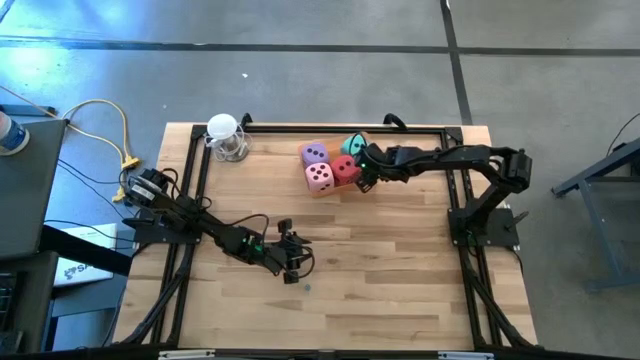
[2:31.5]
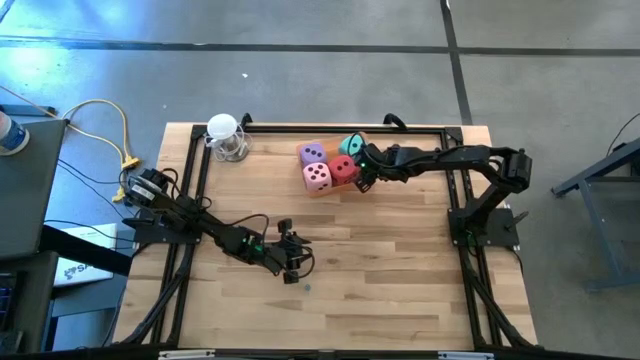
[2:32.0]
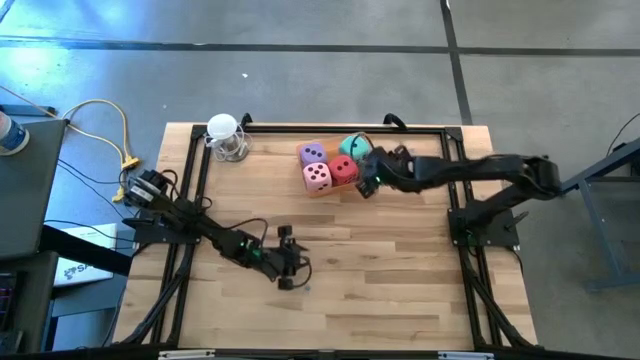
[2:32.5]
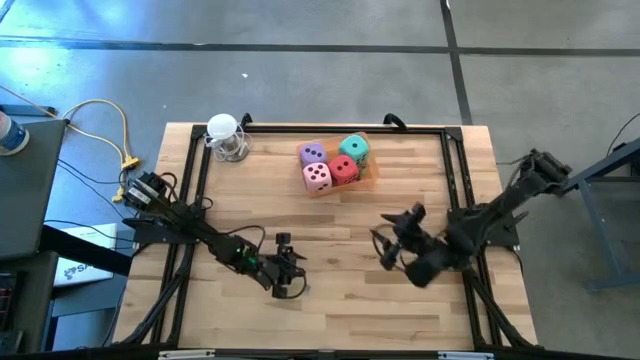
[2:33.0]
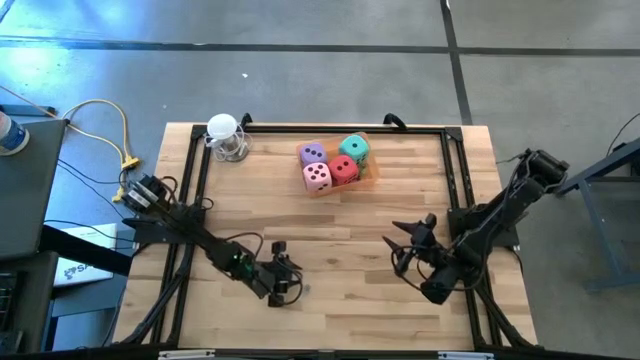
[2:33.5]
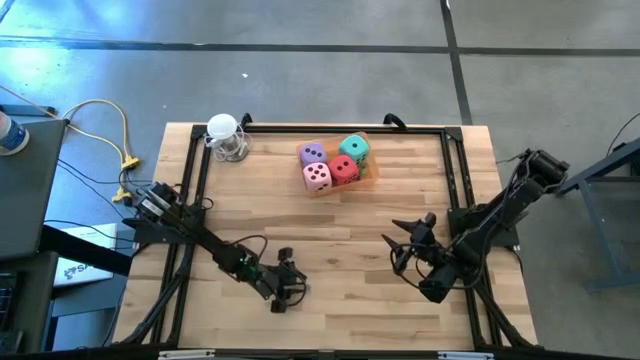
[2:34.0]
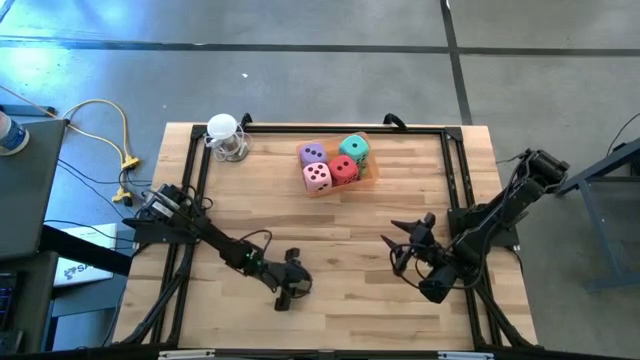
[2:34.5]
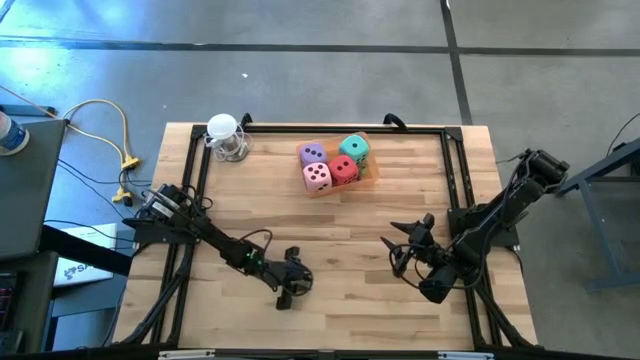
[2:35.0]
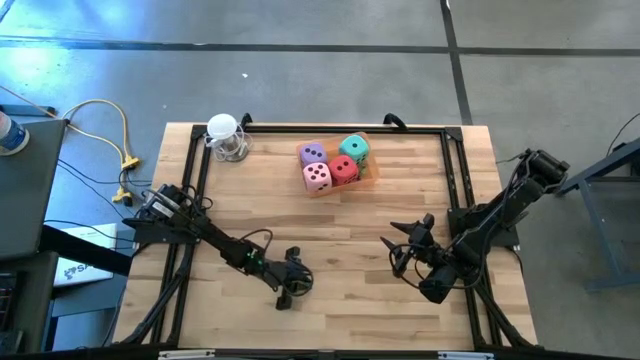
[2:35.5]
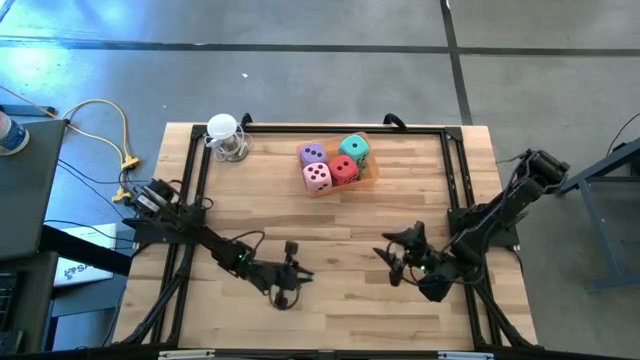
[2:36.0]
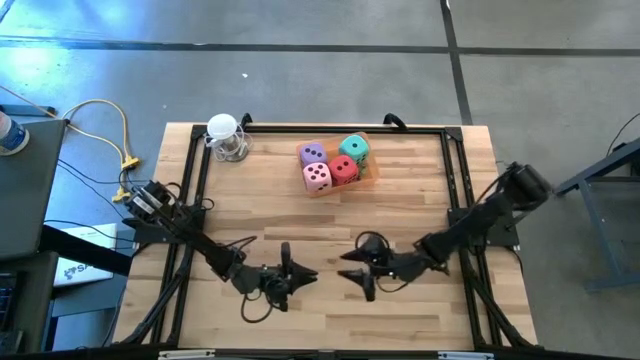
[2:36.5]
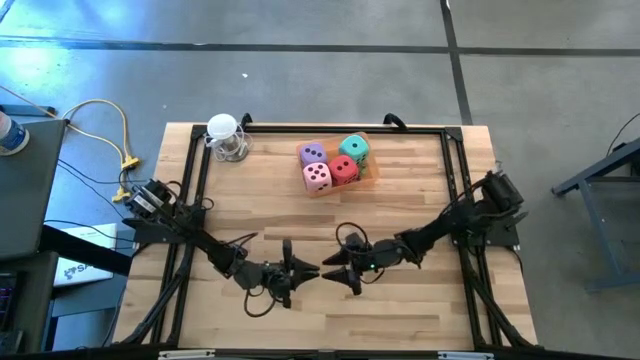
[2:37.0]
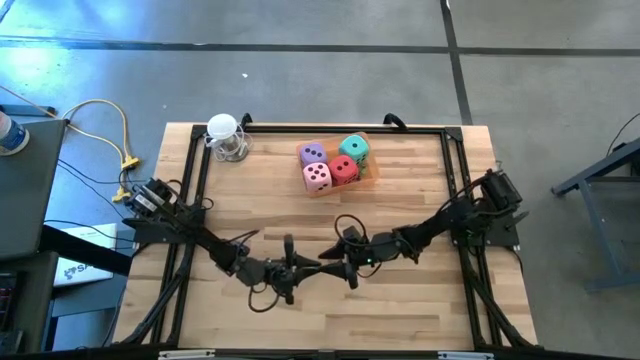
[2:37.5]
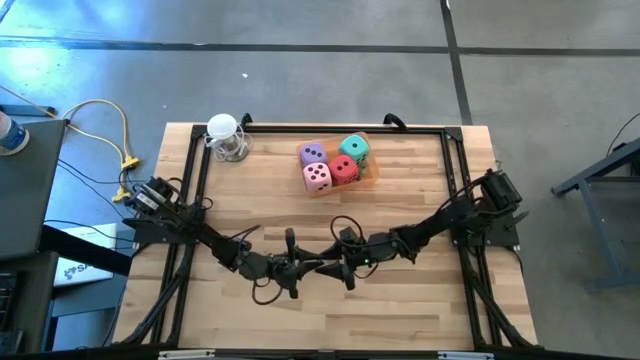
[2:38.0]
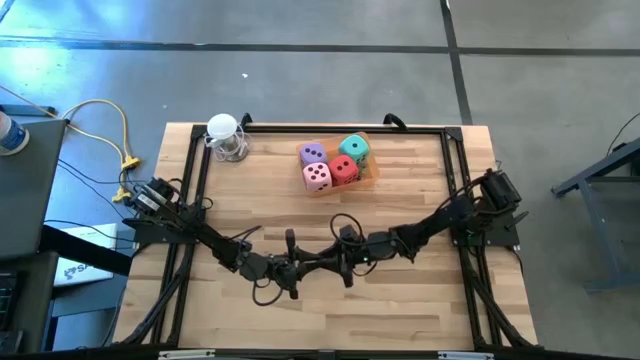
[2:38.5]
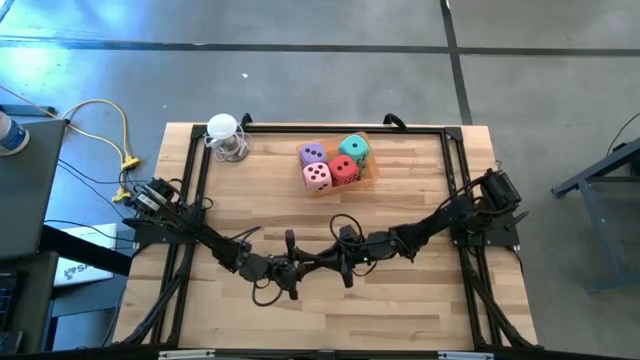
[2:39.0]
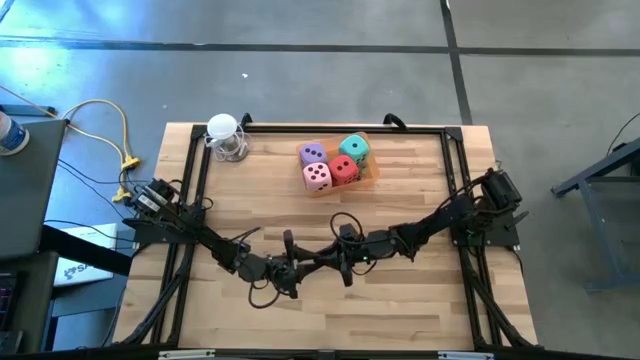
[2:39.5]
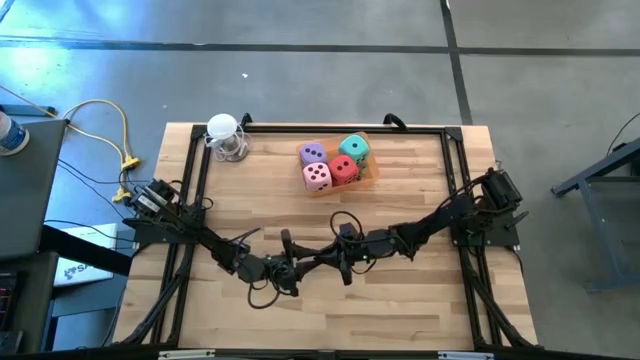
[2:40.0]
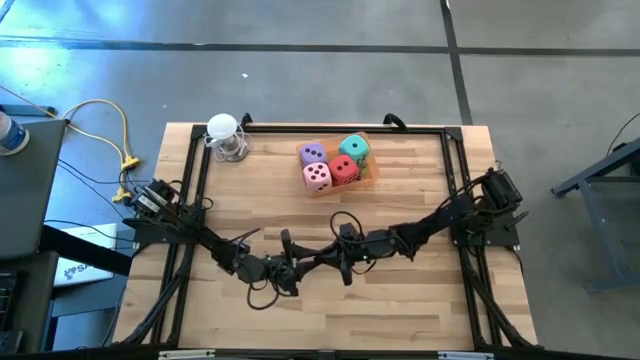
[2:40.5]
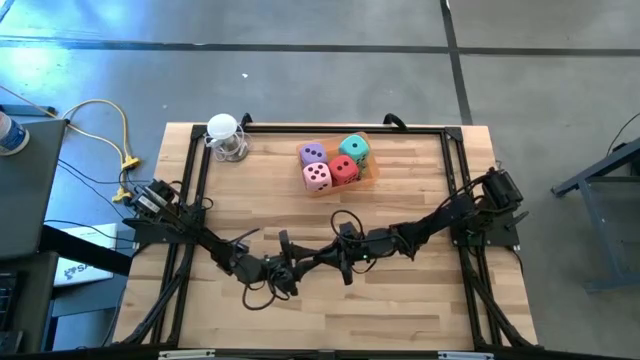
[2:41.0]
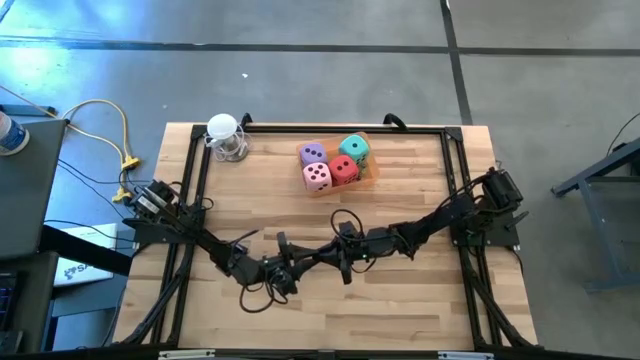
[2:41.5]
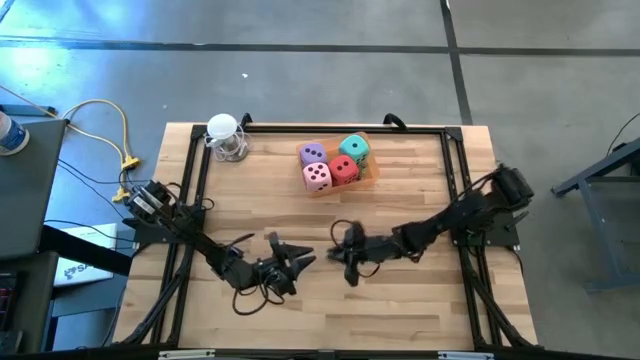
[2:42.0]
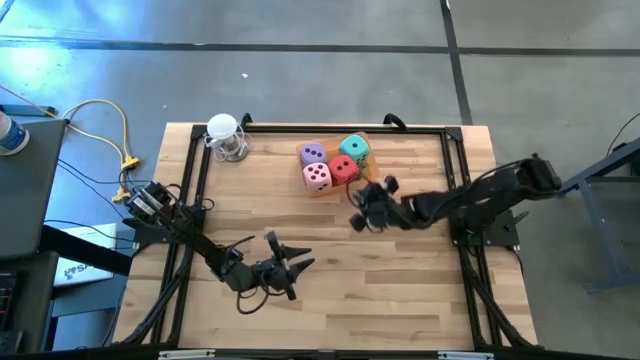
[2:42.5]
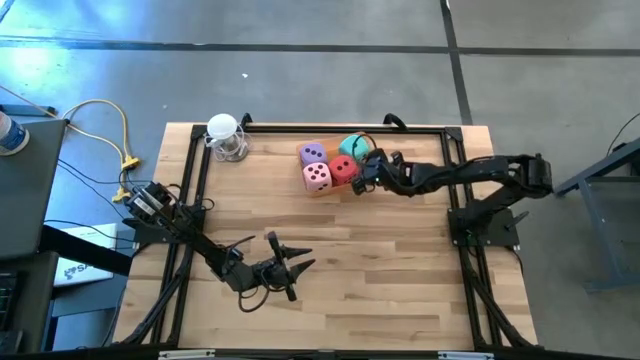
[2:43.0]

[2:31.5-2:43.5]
Task: Pick & Place Dice
Put the small light blue dice into the orange container

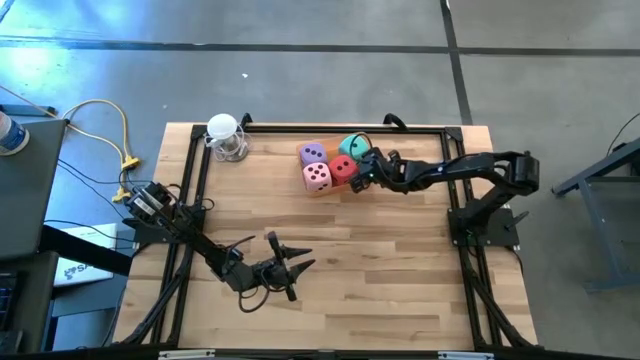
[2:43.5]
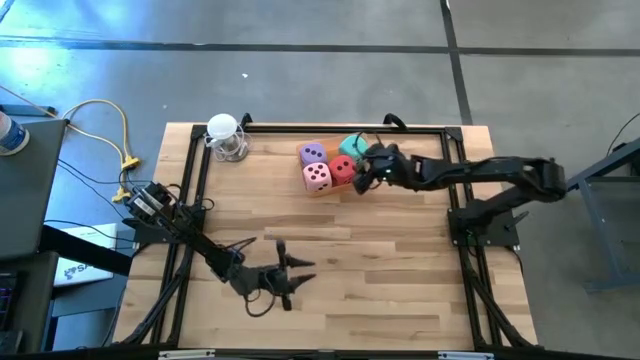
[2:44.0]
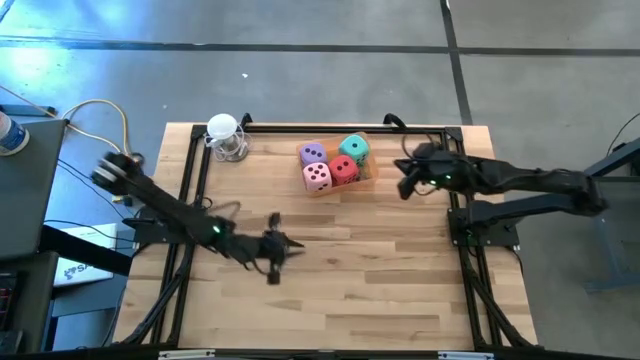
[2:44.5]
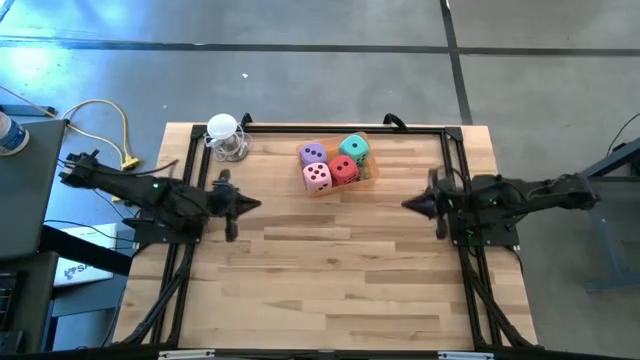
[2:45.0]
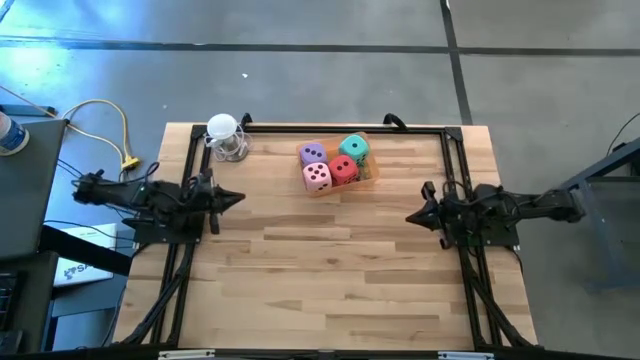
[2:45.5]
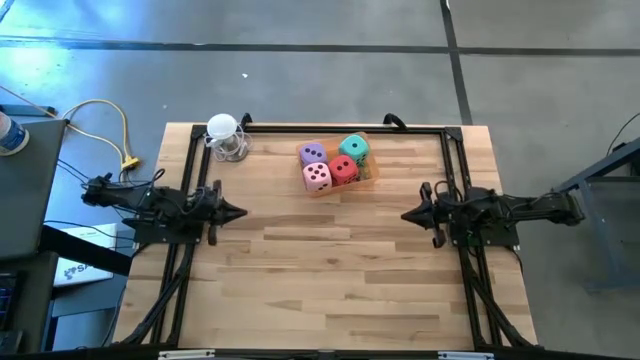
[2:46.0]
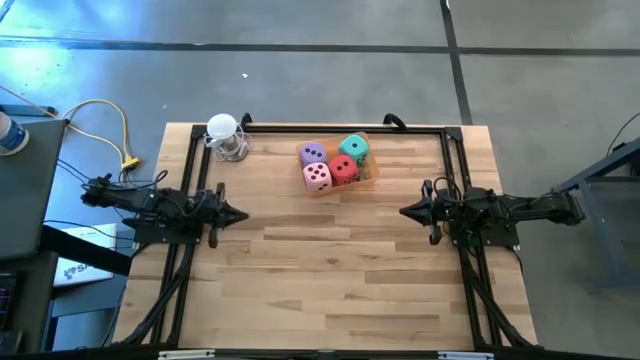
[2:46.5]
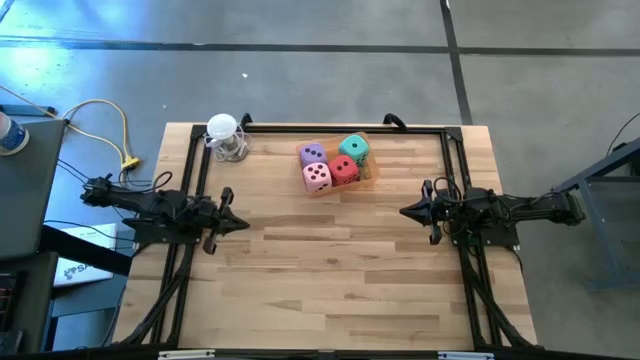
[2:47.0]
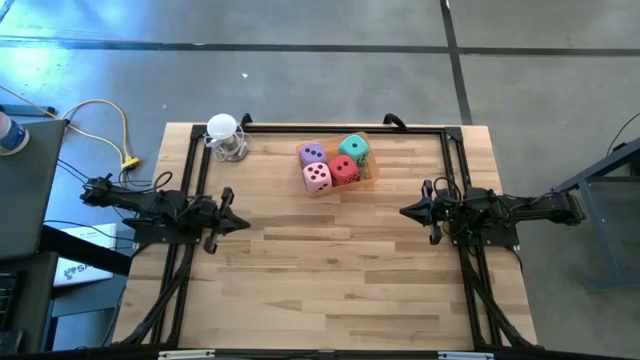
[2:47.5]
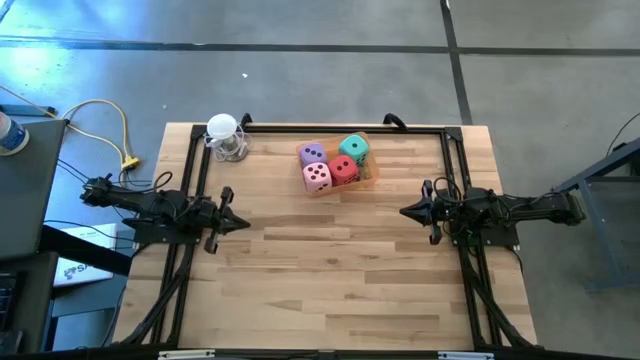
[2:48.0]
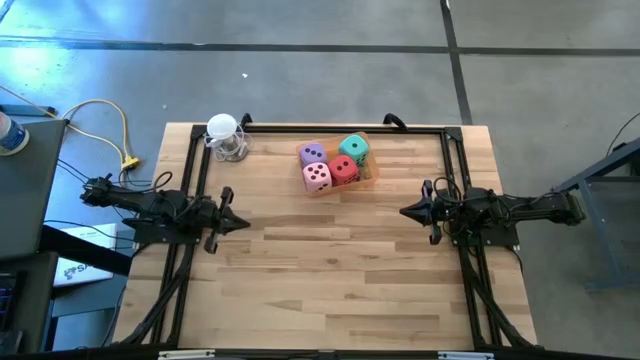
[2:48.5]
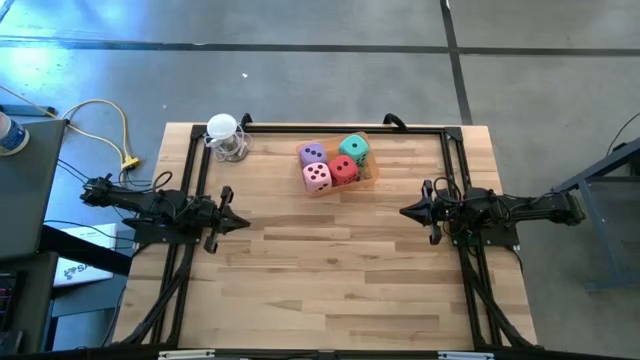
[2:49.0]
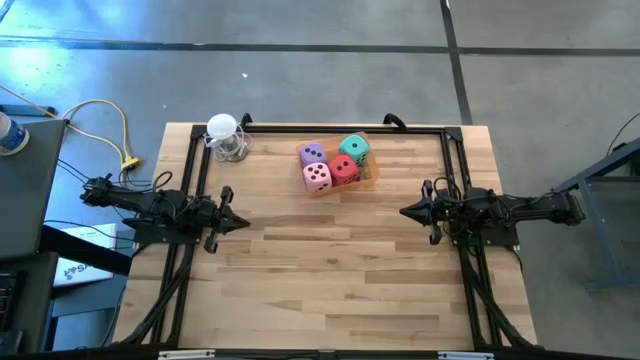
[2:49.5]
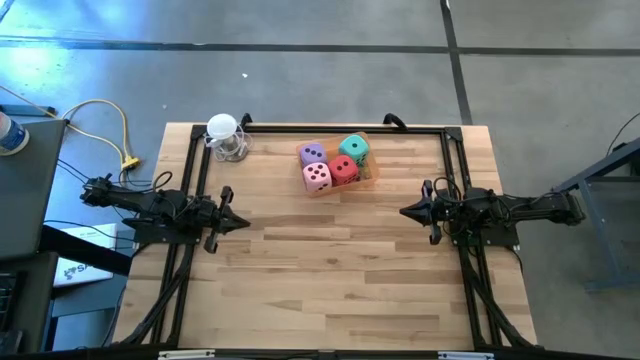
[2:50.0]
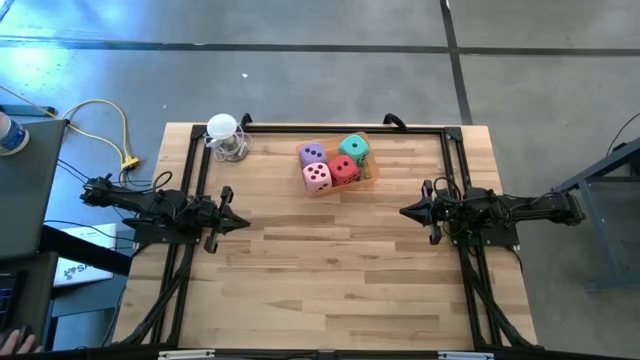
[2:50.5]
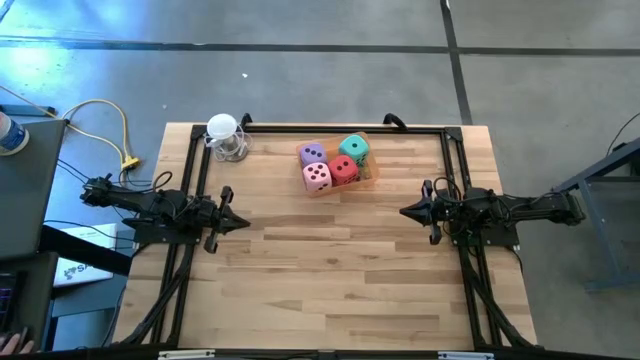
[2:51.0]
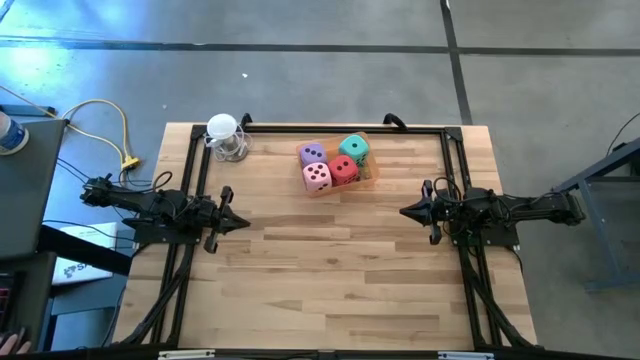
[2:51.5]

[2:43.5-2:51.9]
Return to Home Position
